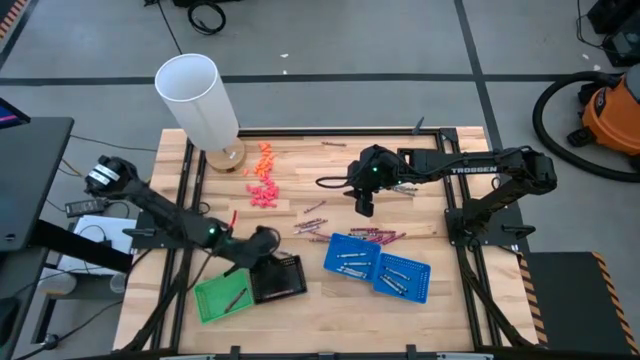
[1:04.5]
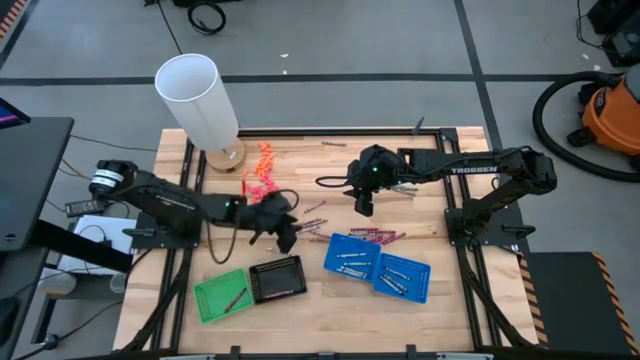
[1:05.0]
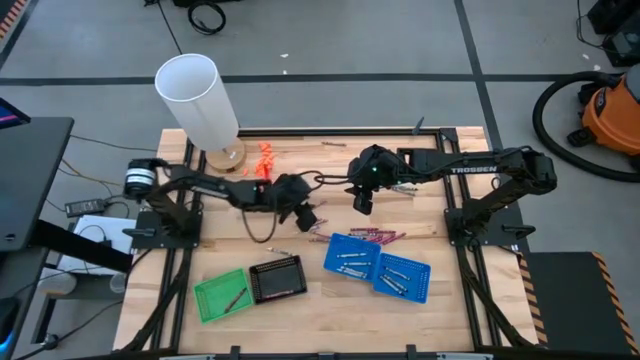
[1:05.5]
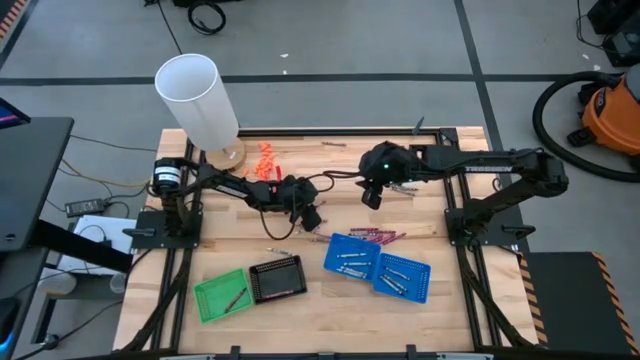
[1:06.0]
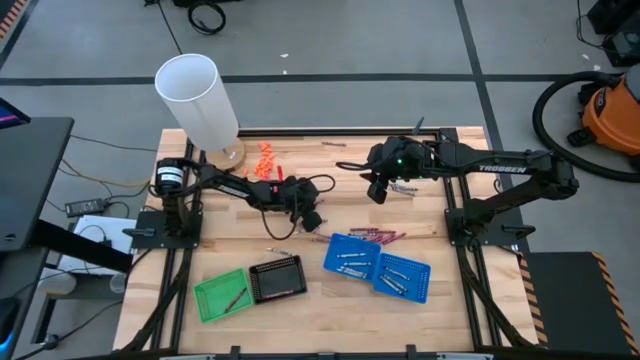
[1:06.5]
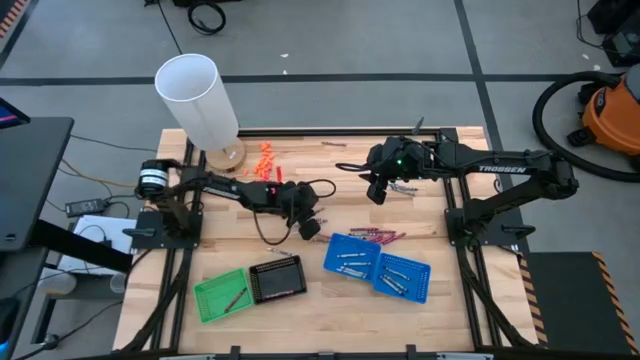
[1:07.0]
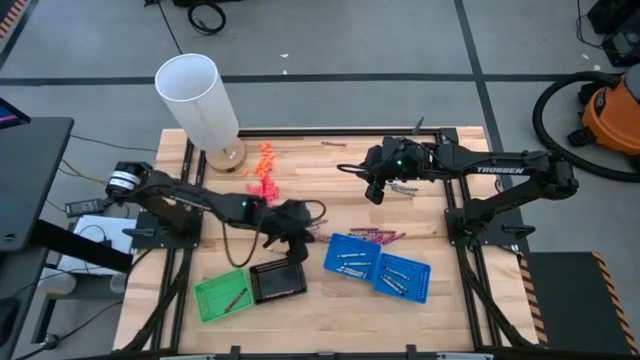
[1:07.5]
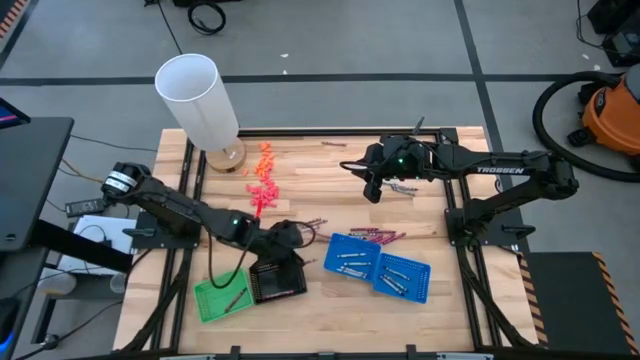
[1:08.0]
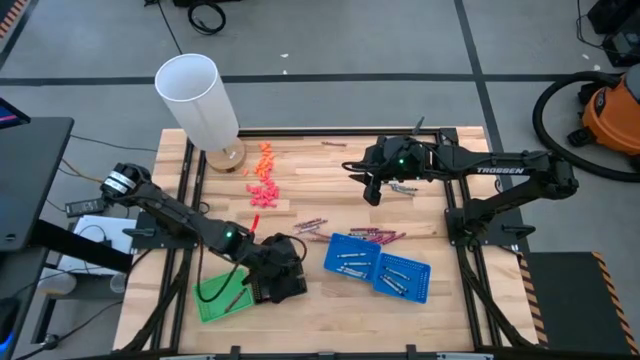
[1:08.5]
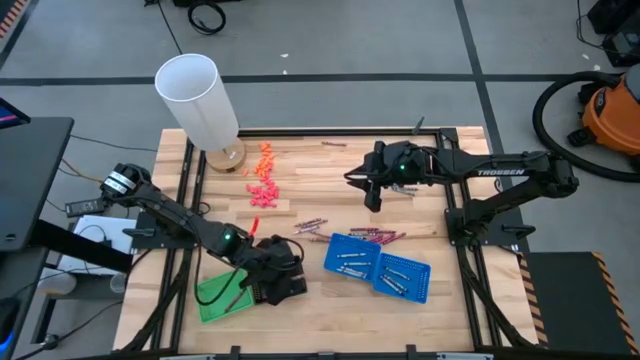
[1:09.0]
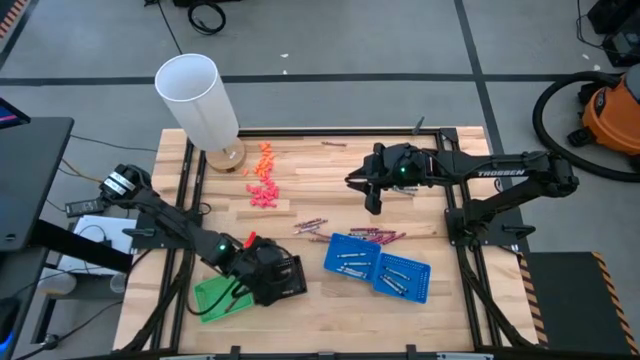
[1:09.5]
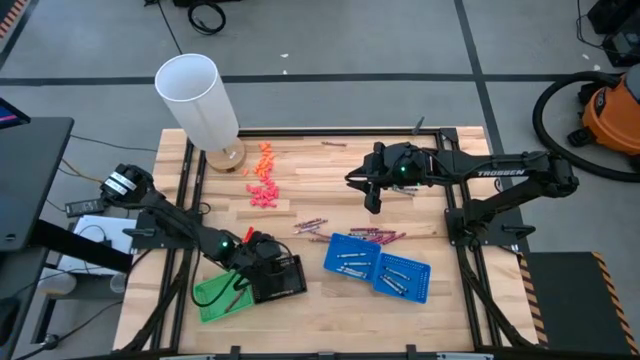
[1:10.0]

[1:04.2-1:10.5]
Task: Sort crayons
Put the pink crayon into the black bin

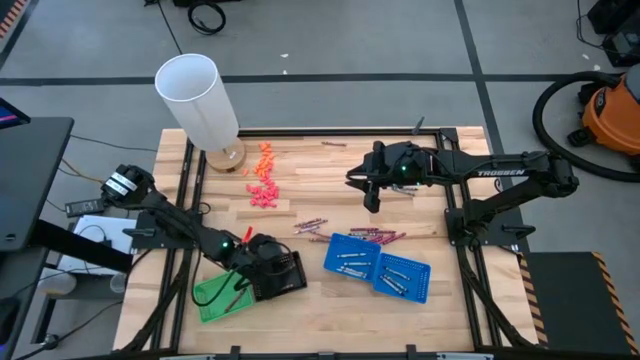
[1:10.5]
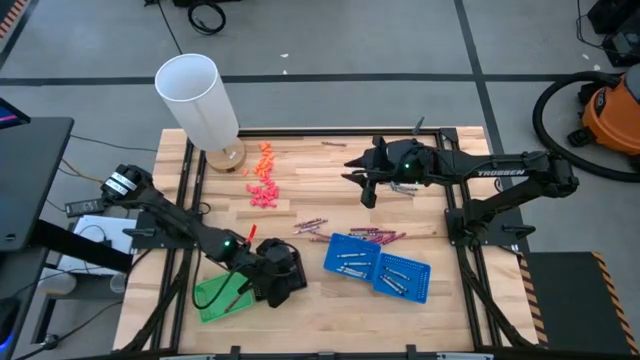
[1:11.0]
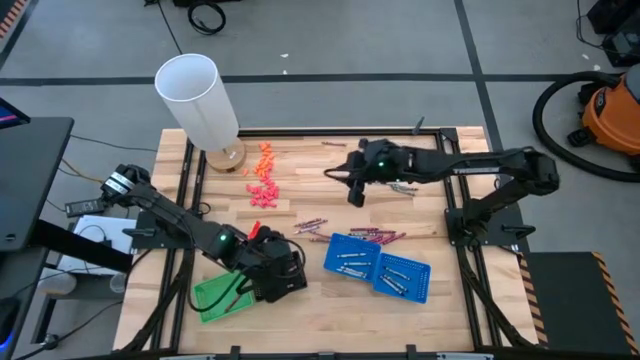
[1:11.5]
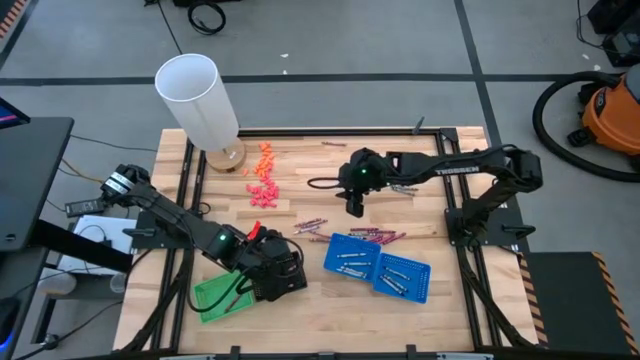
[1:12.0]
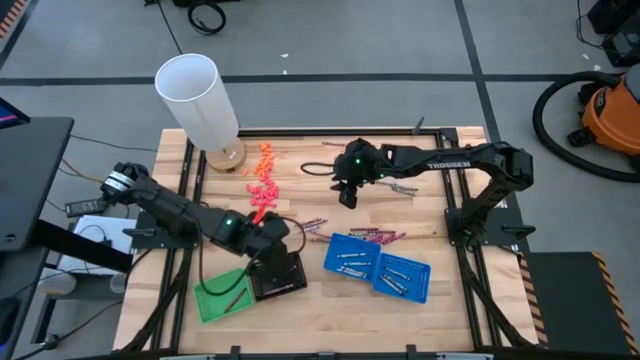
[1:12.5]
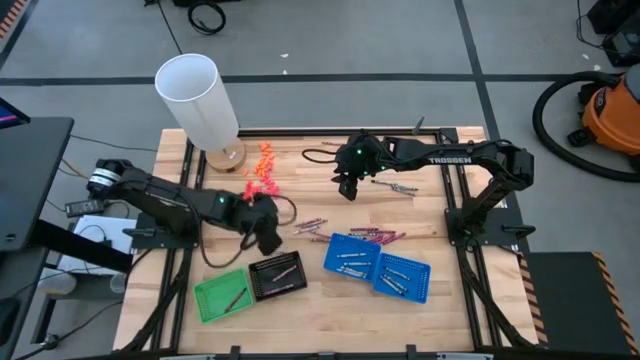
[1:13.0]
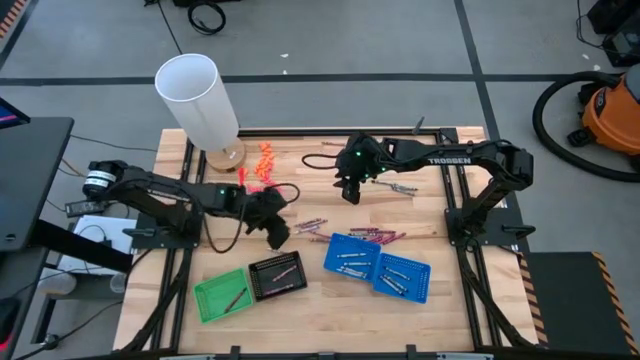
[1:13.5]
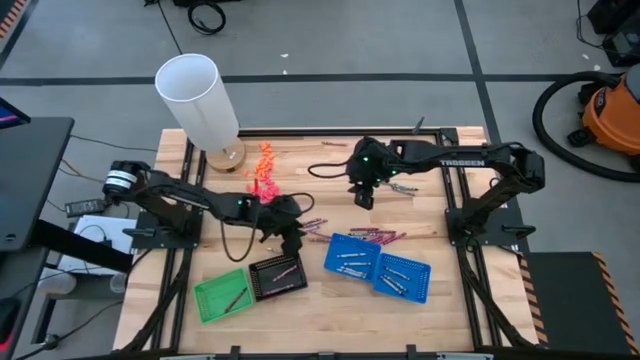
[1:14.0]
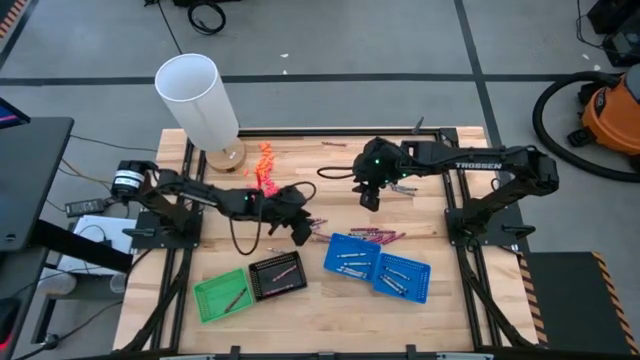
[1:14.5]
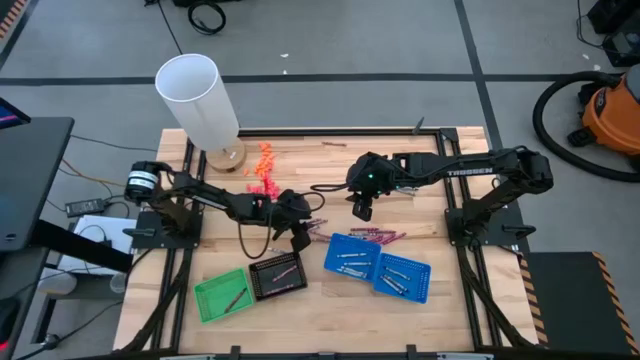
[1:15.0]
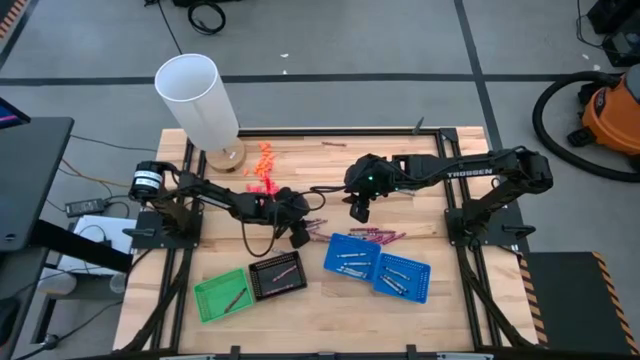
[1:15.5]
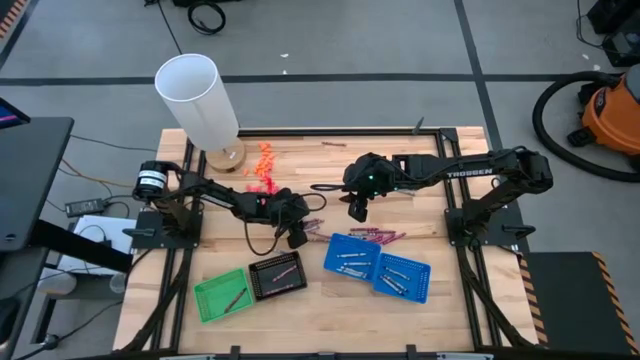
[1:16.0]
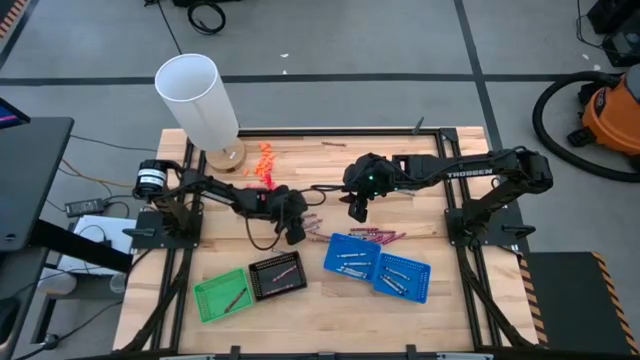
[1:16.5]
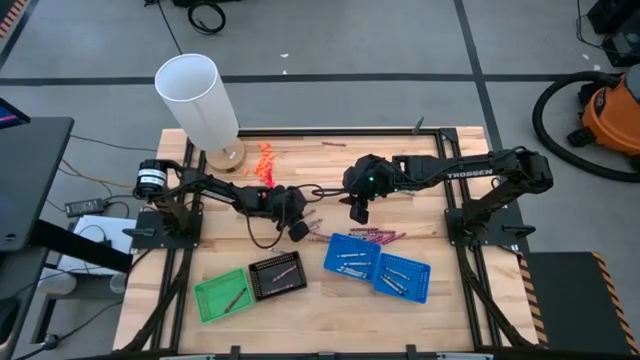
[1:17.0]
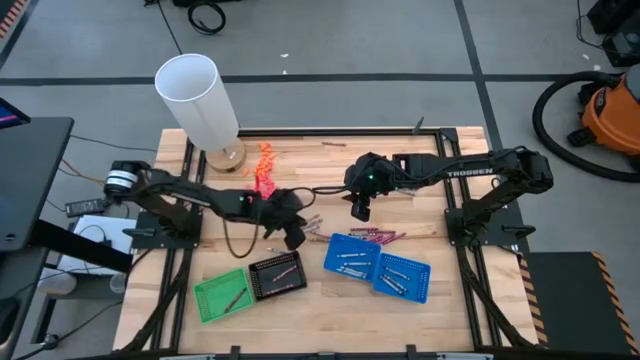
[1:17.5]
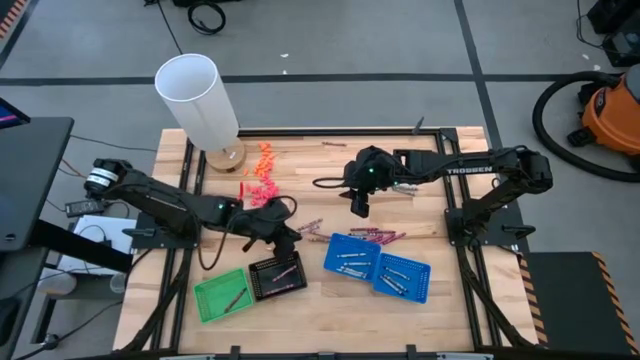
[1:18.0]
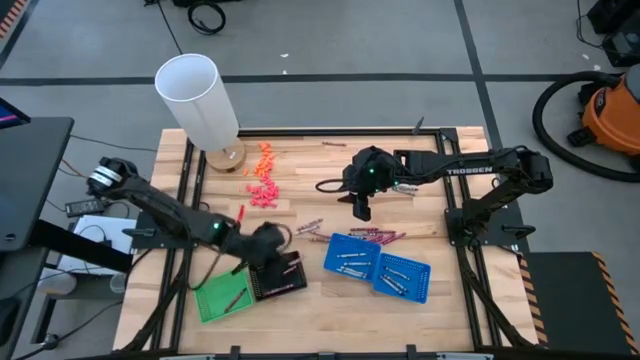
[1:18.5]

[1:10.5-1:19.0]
Put the pink crayon into the black bin

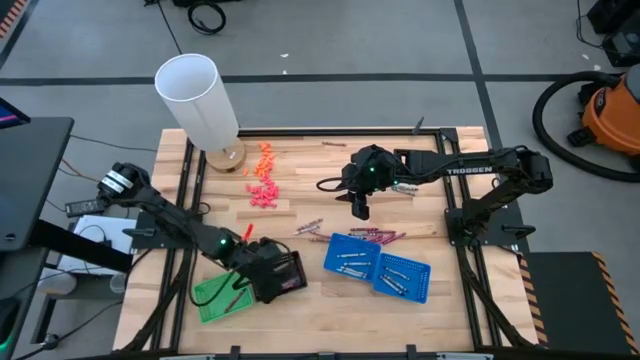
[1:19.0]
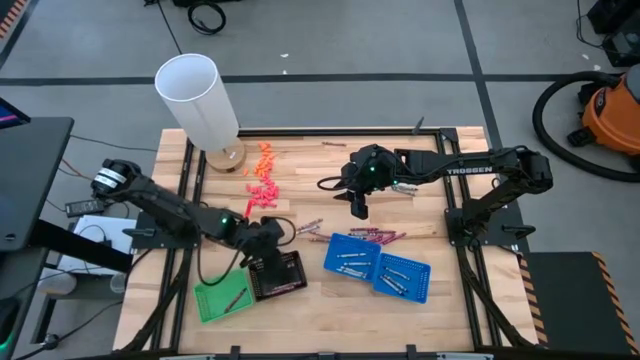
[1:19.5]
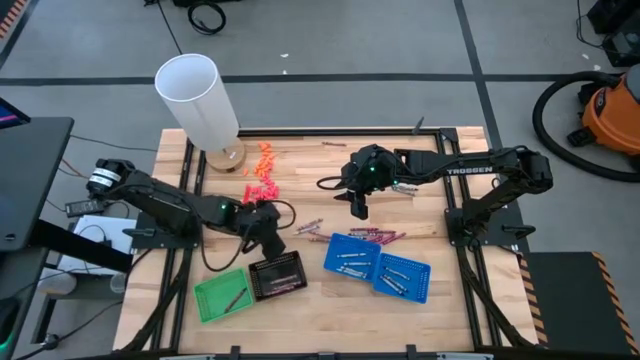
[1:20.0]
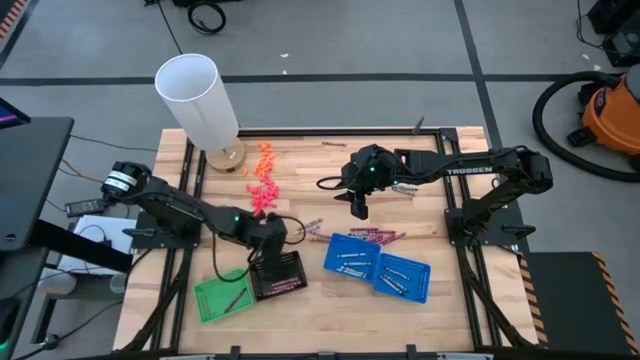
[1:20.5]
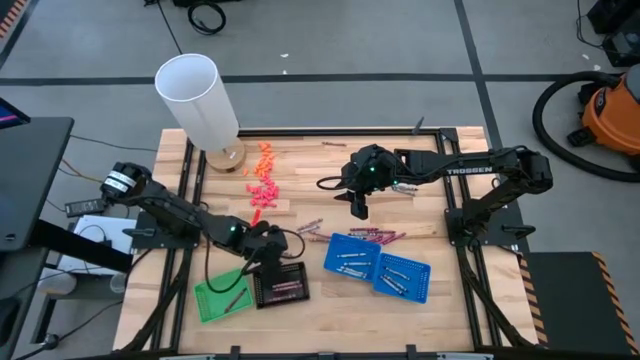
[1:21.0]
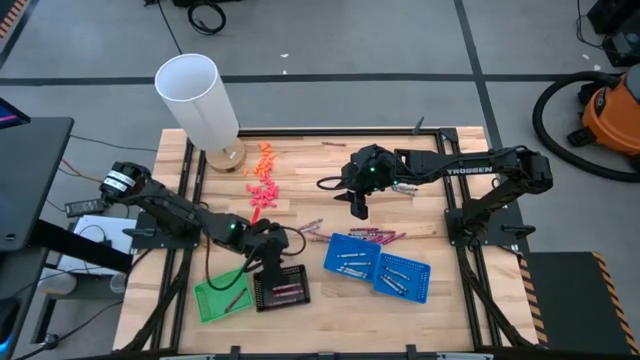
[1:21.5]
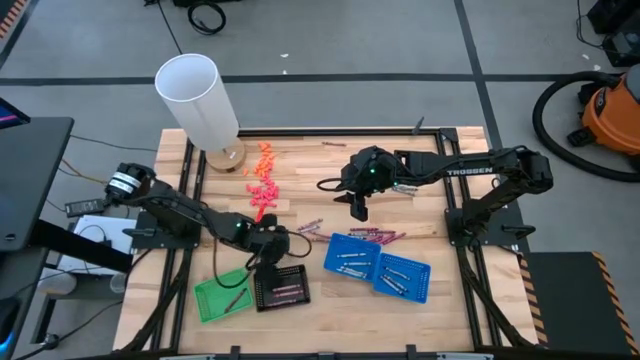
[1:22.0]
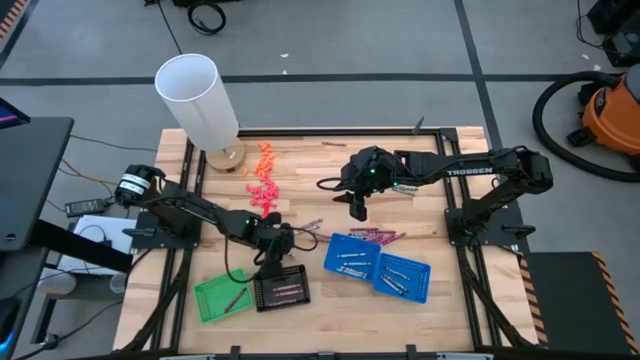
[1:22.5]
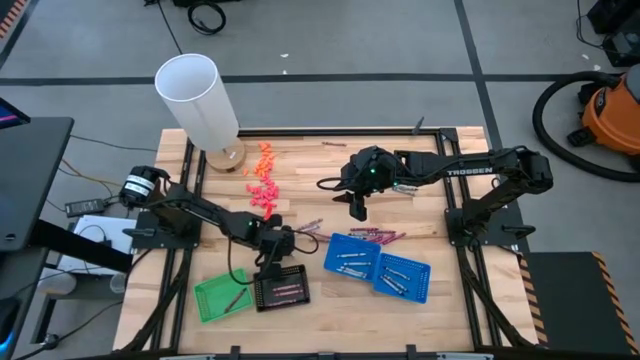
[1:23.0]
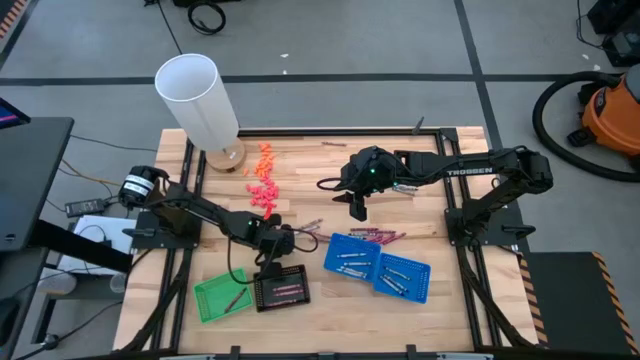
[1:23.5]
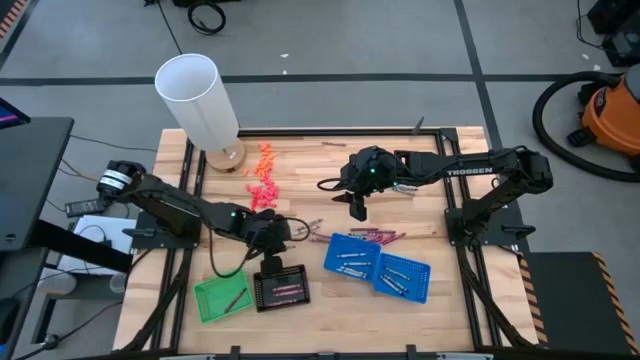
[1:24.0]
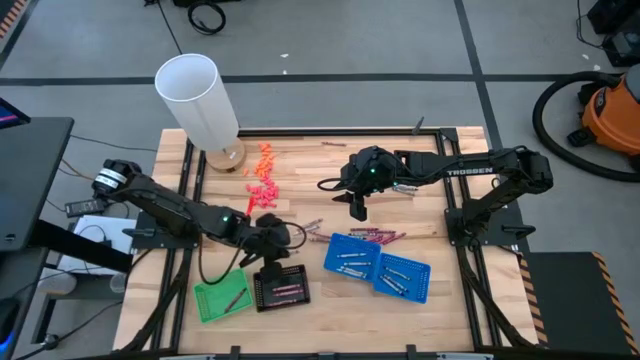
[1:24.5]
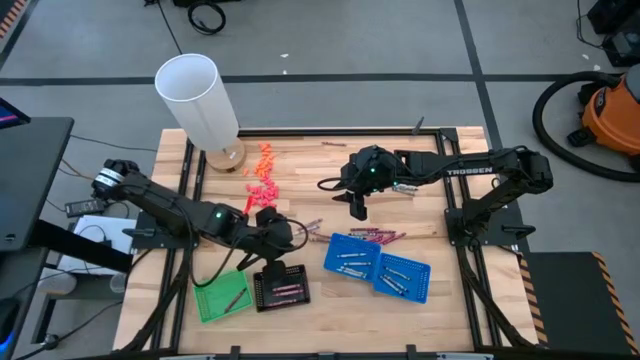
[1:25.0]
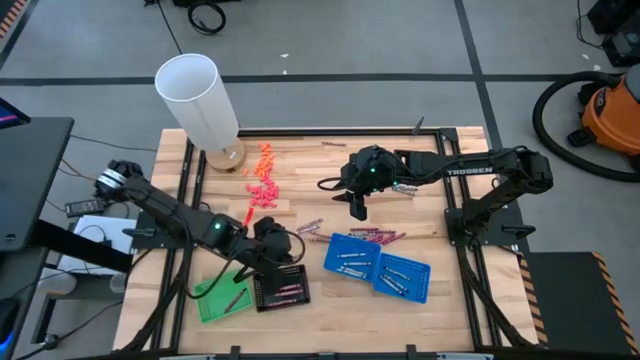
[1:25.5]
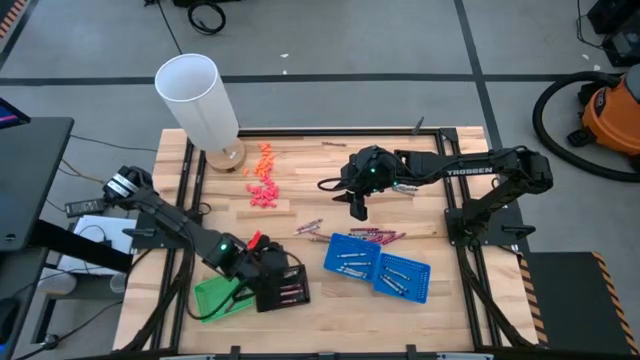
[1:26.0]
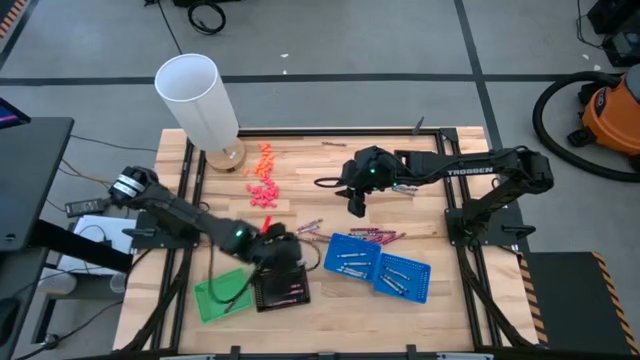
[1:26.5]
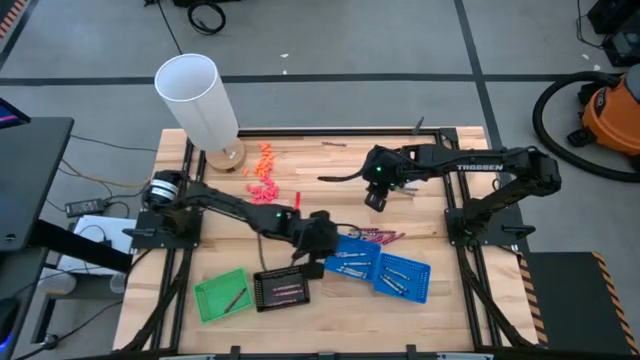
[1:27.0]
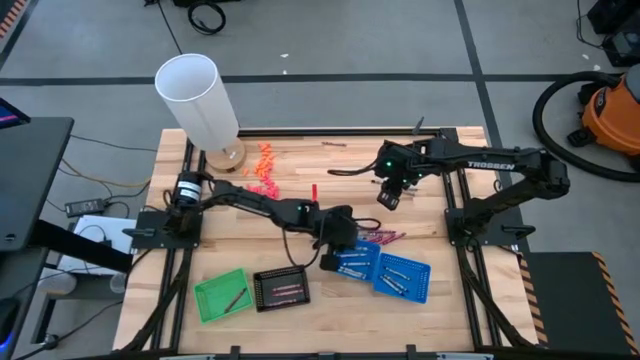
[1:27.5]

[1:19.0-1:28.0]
Put the white crayon into the left blue bin
